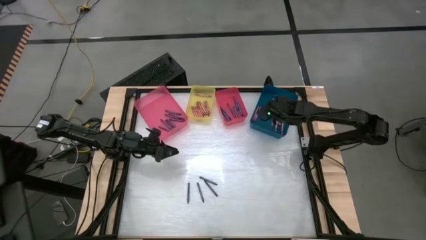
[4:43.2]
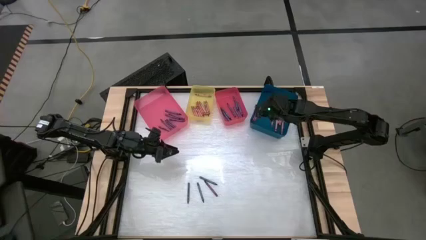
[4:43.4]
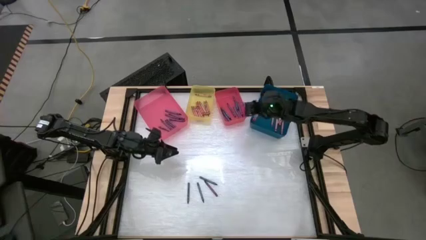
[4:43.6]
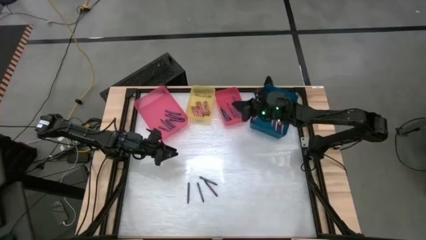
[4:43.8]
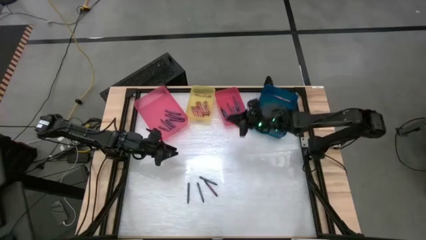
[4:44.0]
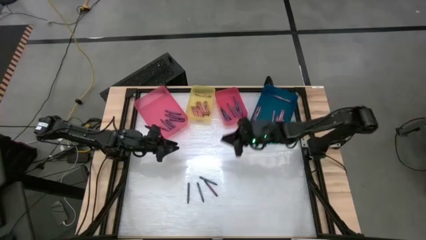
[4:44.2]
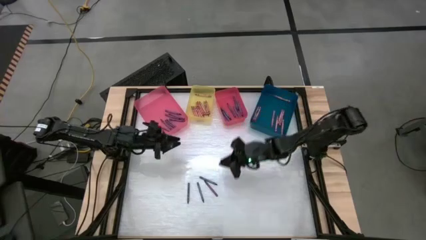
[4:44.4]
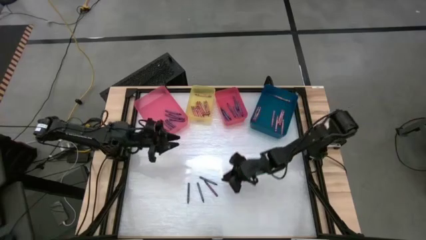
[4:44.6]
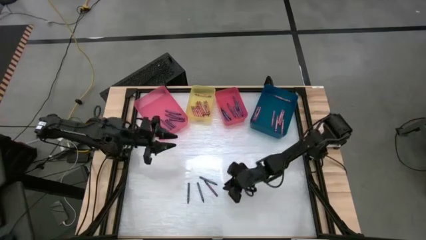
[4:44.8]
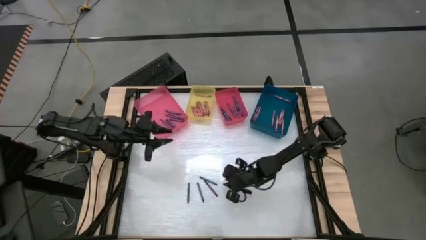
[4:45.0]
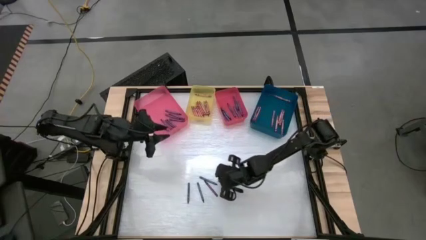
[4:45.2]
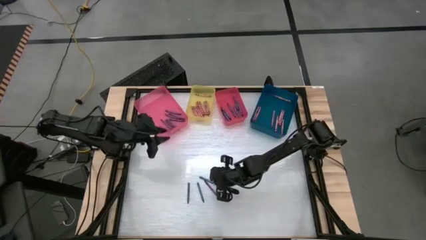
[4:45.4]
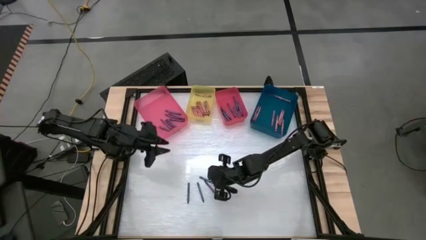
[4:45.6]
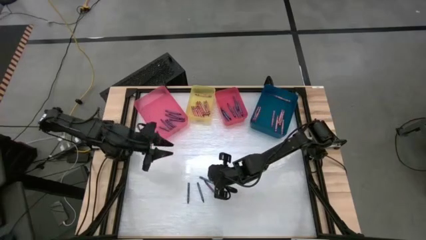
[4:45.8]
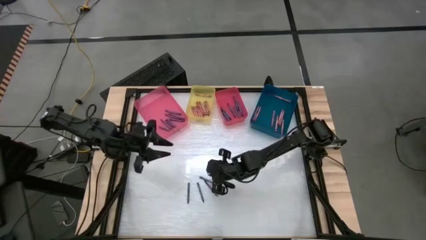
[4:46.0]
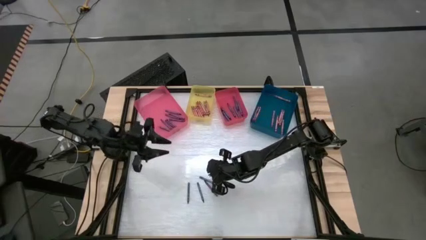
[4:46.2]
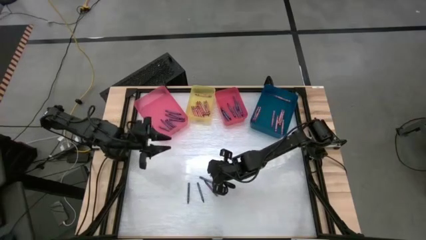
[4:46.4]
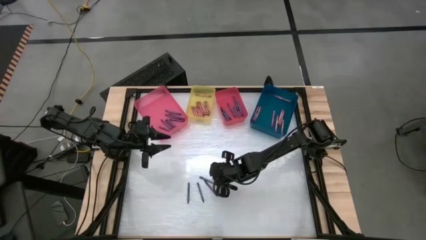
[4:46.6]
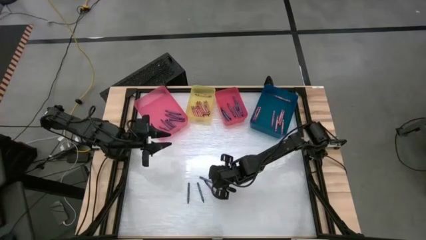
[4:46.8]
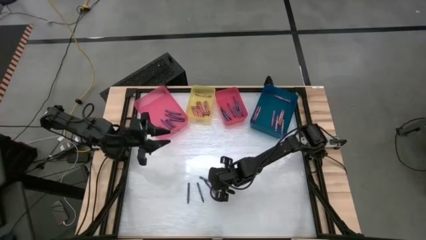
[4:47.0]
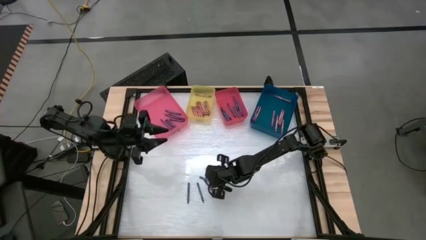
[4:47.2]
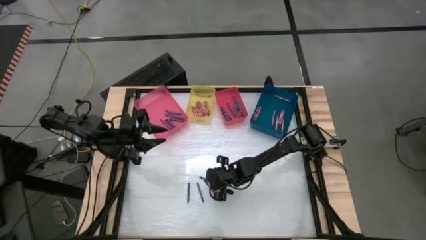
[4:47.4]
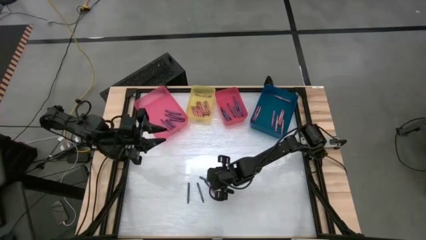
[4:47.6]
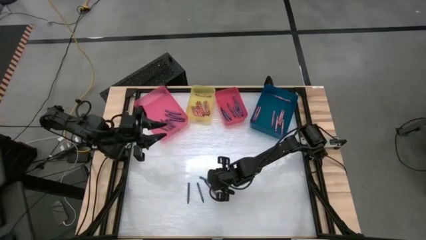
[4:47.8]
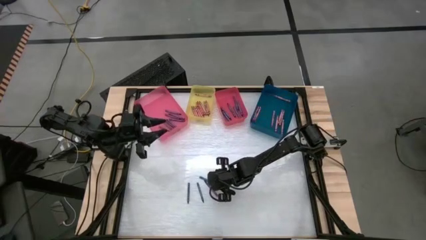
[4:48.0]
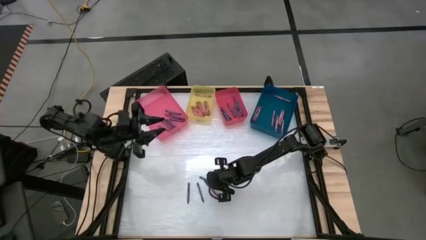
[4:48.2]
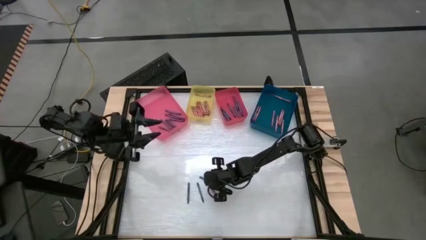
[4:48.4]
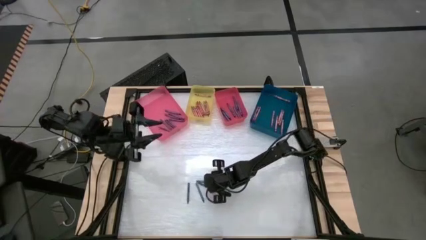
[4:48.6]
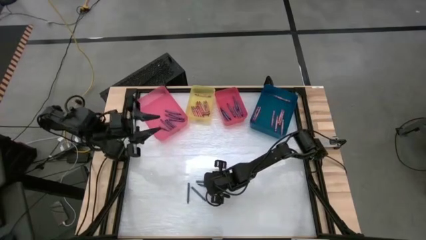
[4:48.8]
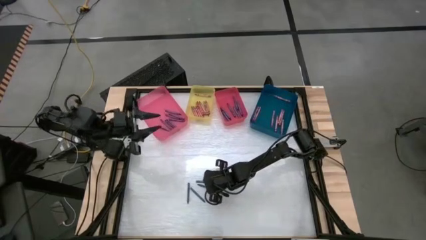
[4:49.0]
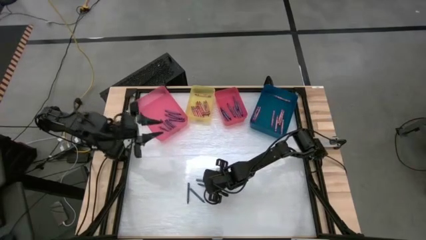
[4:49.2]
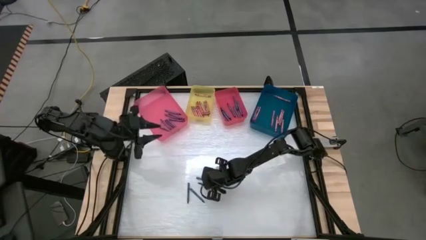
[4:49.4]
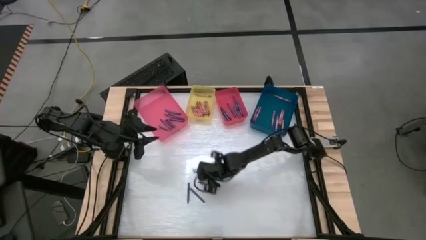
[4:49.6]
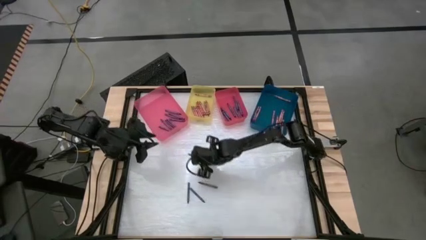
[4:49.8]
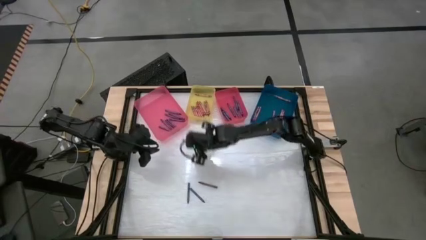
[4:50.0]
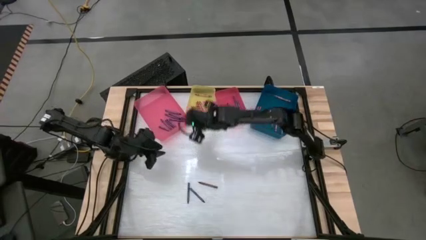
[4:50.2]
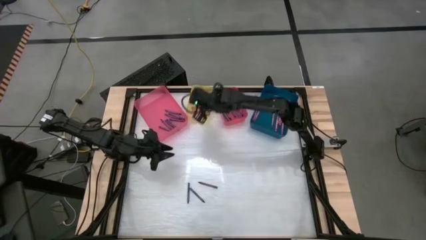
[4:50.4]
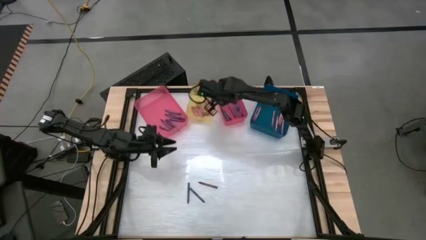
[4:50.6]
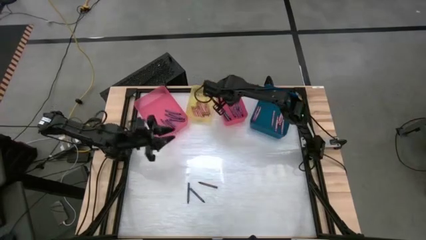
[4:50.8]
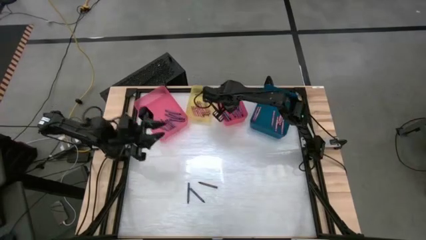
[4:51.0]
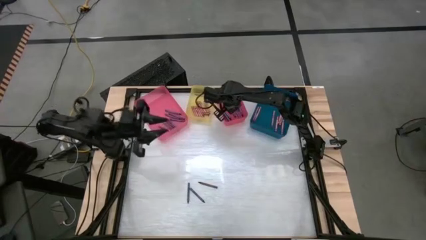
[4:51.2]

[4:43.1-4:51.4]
Task: Sort crayons
Put the blue crayon into the red bin

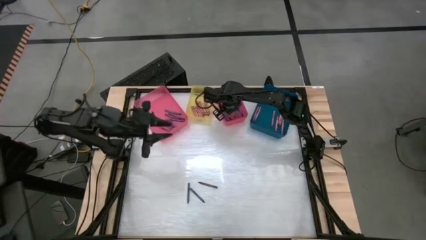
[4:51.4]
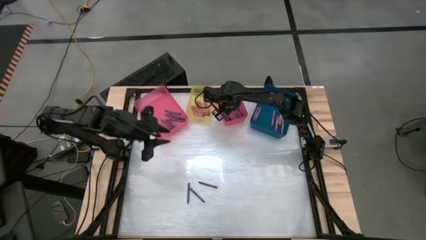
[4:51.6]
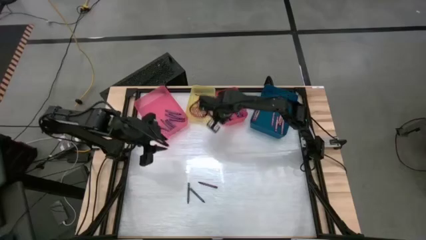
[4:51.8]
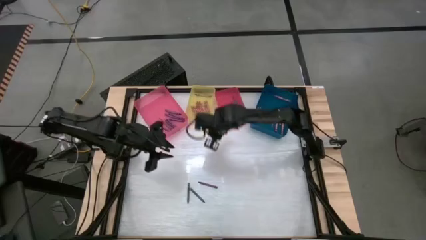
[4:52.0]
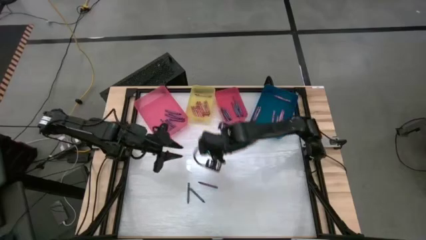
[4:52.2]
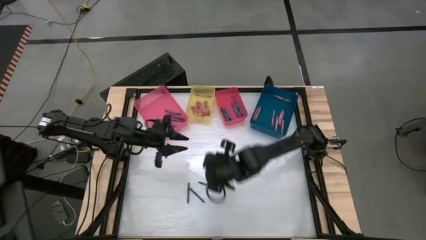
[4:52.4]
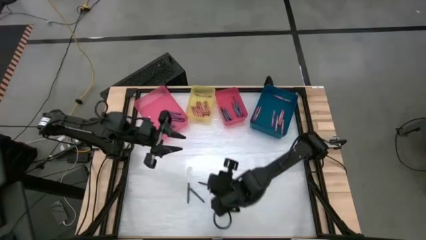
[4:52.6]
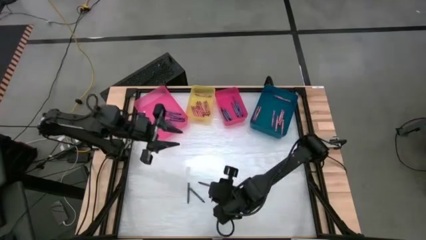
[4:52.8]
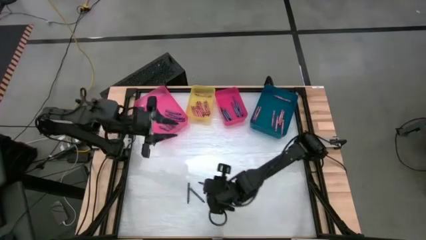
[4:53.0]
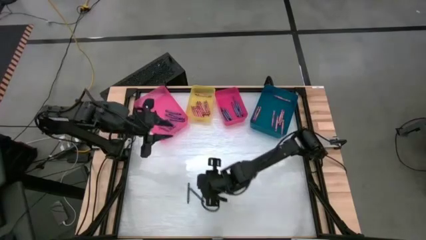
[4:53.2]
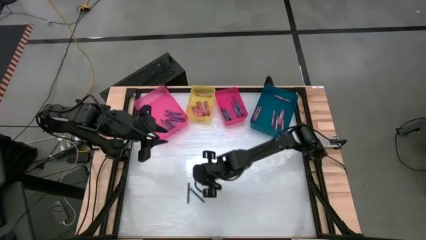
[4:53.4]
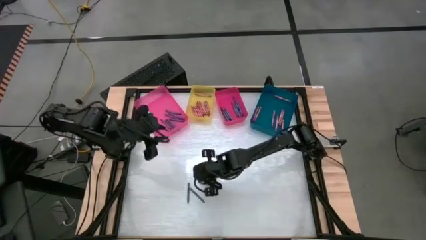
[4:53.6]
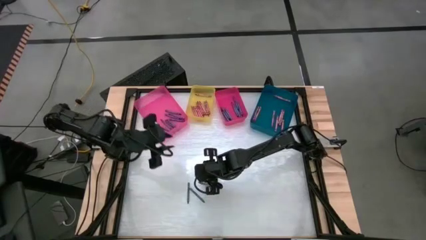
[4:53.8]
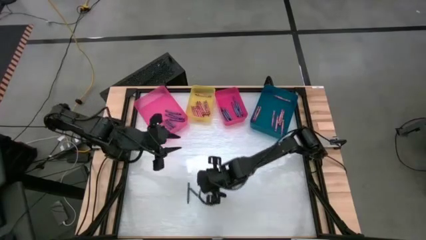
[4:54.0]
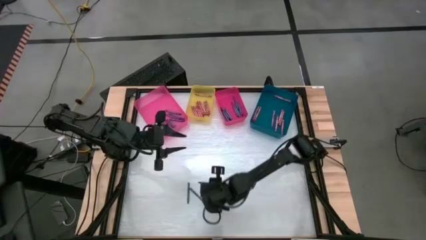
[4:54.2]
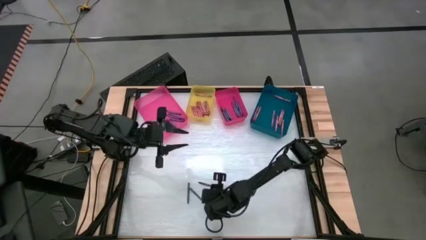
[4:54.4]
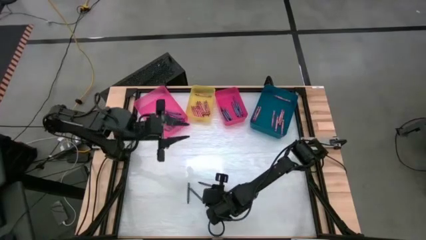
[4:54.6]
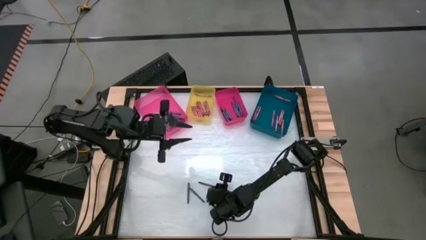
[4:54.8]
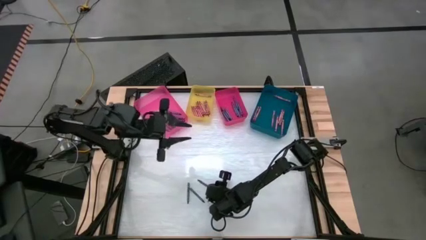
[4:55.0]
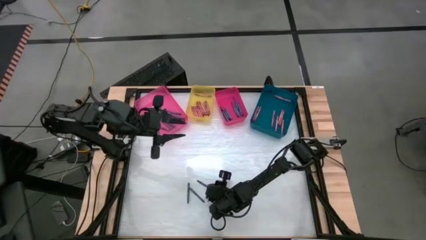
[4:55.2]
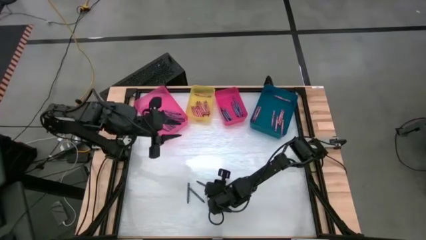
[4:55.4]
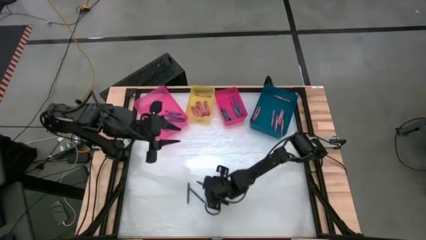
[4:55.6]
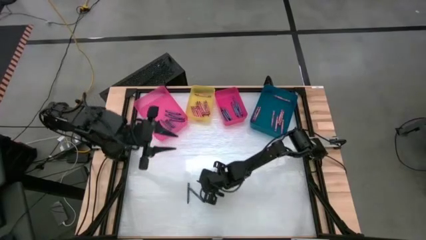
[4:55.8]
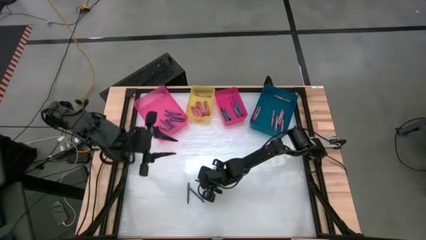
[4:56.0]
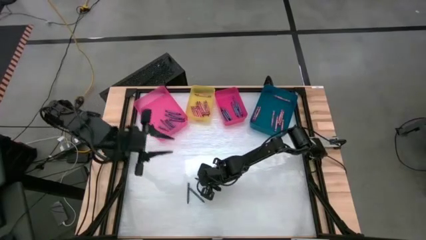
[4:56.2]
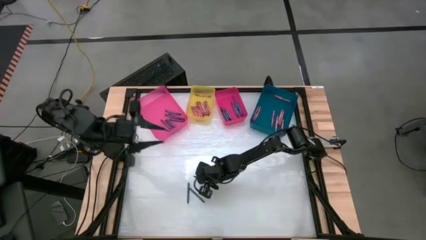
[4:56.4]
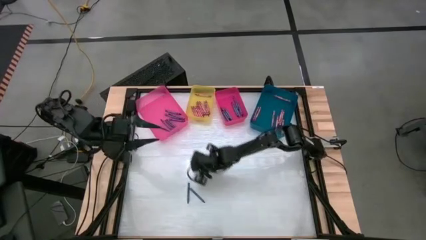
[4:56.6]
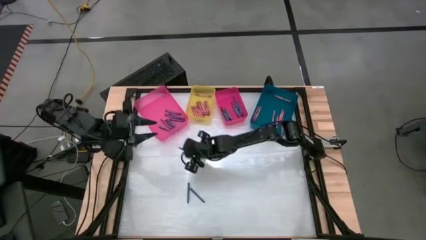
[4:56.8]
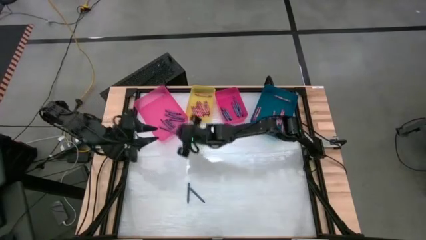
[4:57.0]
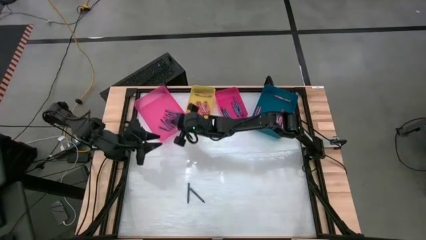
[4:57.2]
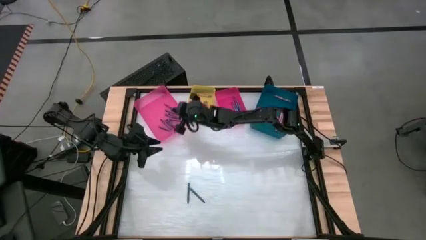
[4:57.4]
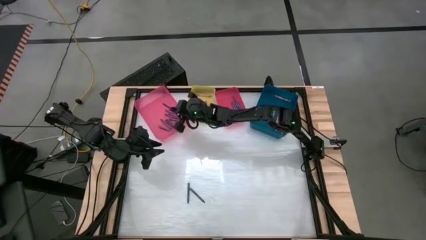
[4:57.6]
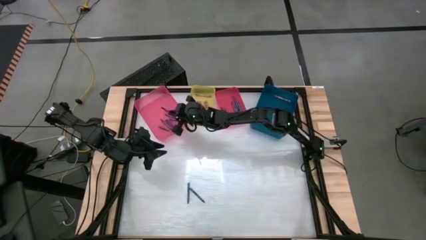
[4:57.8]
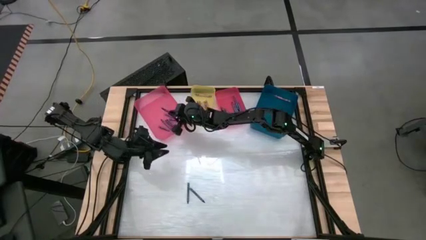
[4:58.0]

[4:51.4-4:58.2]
Put the violet crayon into the pink bin
